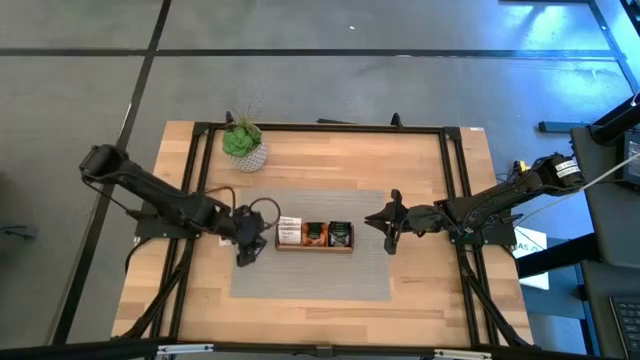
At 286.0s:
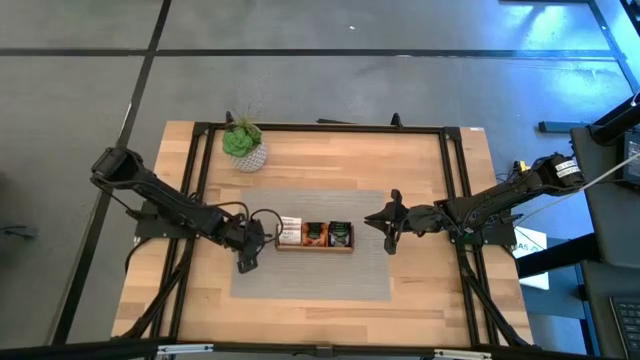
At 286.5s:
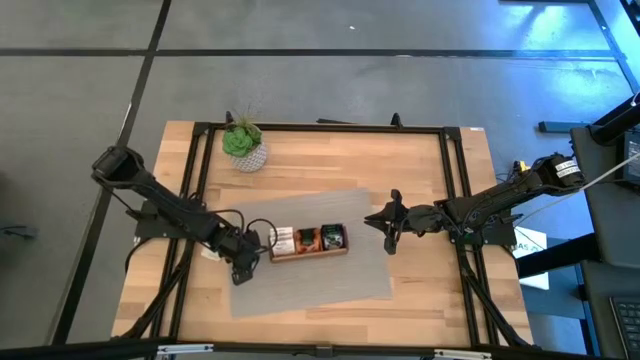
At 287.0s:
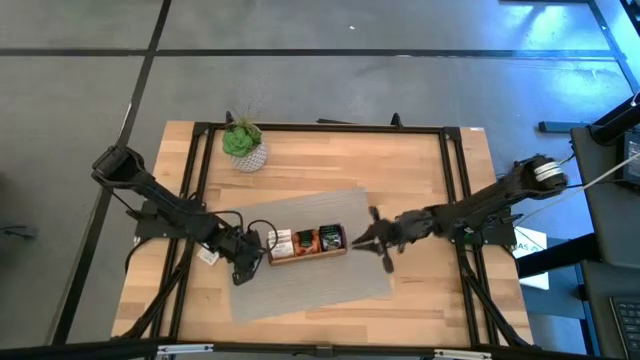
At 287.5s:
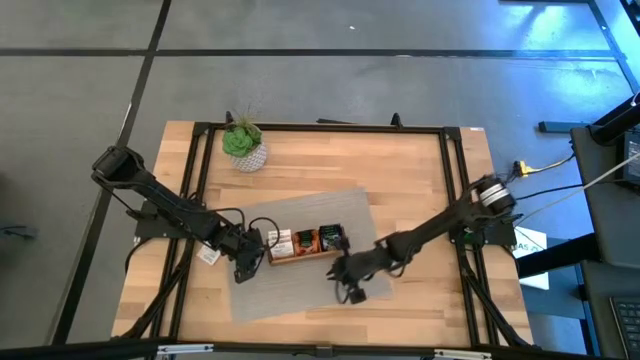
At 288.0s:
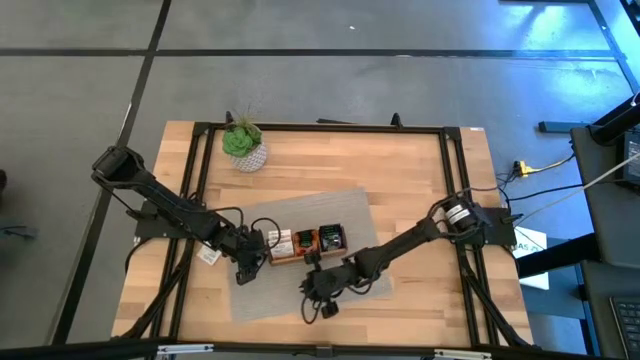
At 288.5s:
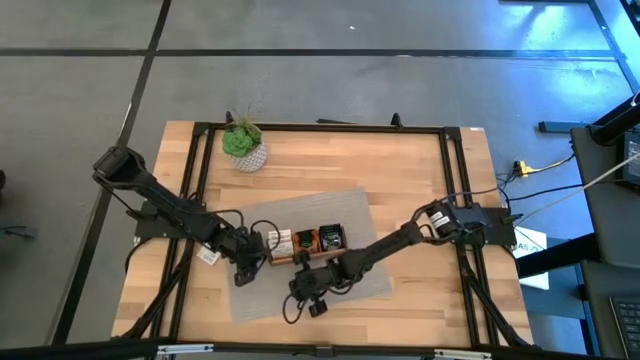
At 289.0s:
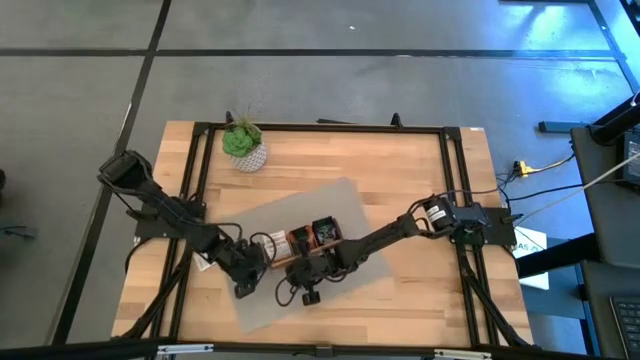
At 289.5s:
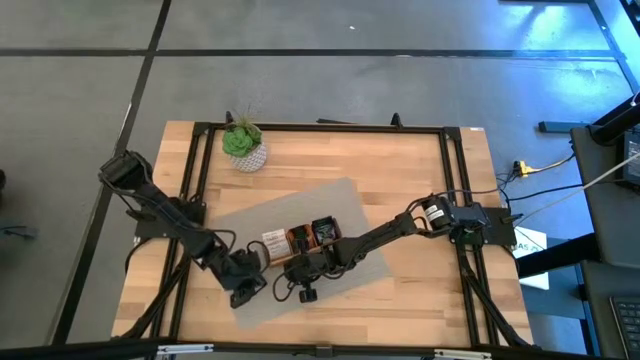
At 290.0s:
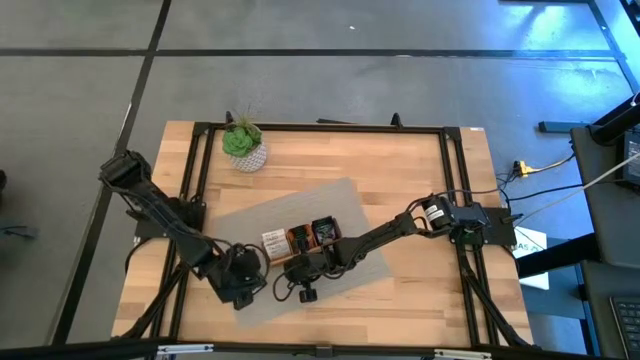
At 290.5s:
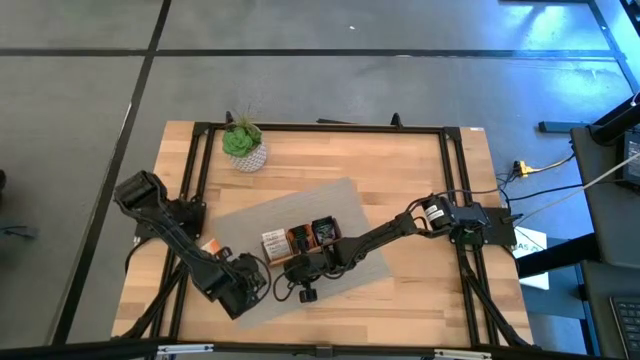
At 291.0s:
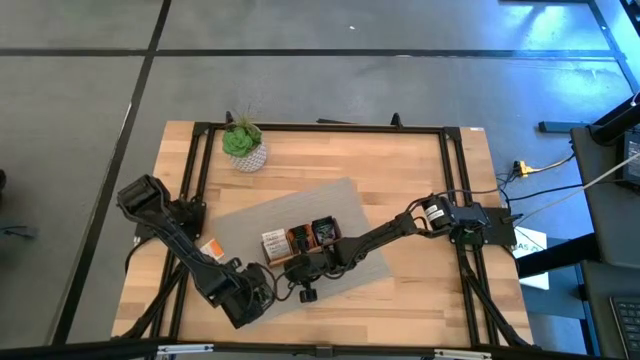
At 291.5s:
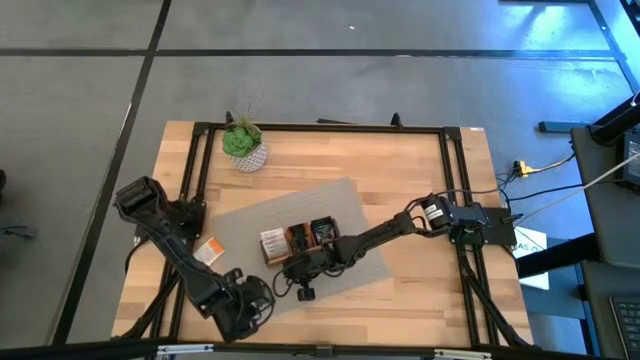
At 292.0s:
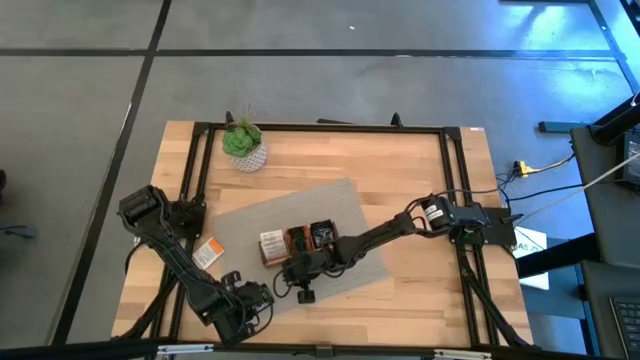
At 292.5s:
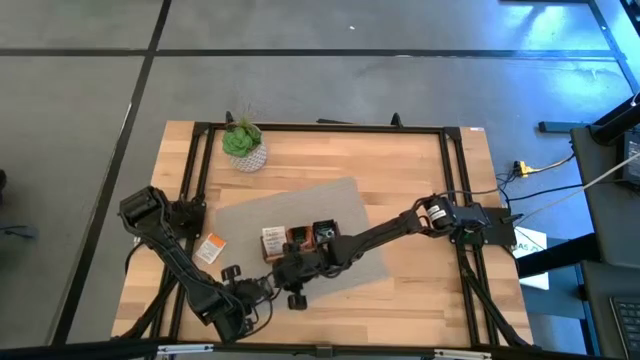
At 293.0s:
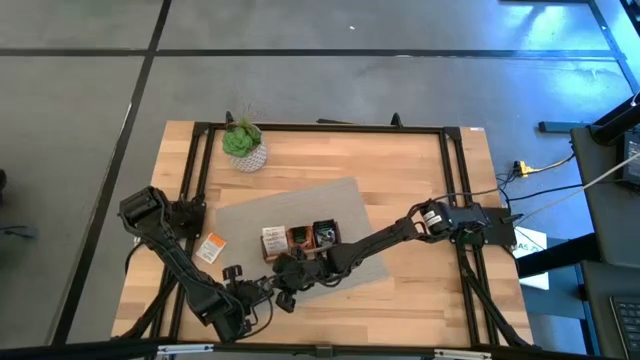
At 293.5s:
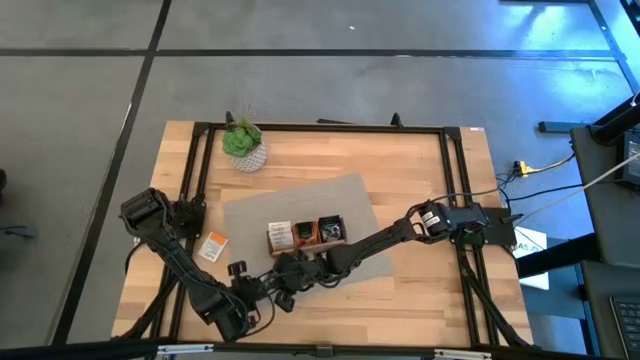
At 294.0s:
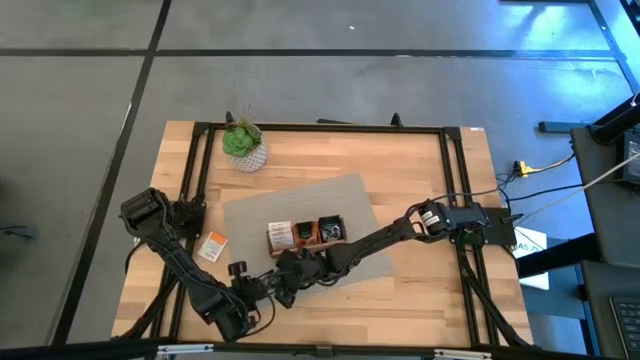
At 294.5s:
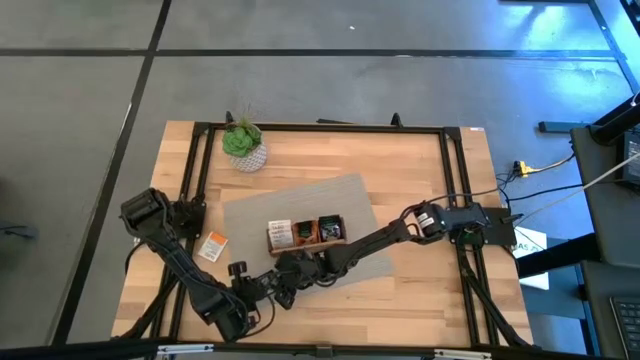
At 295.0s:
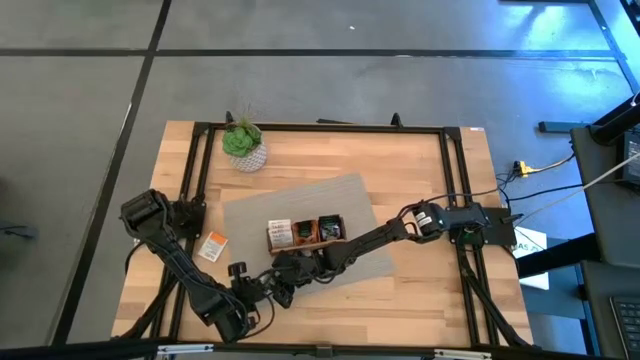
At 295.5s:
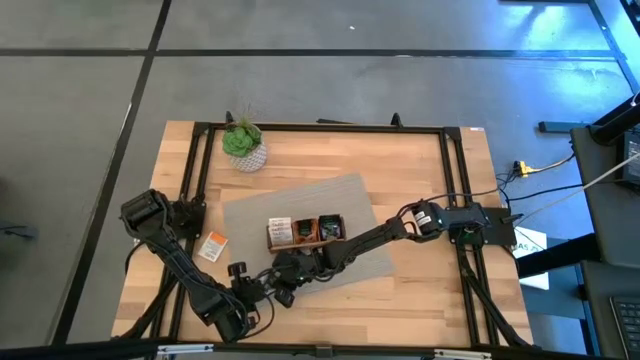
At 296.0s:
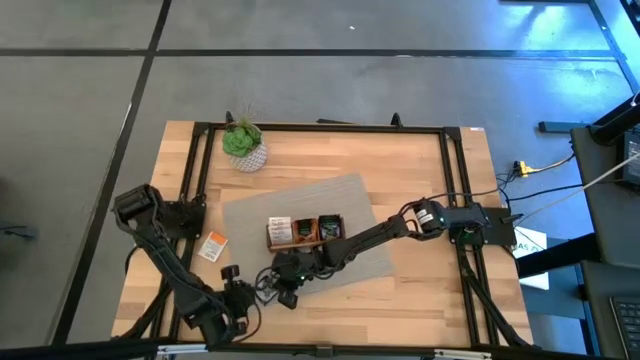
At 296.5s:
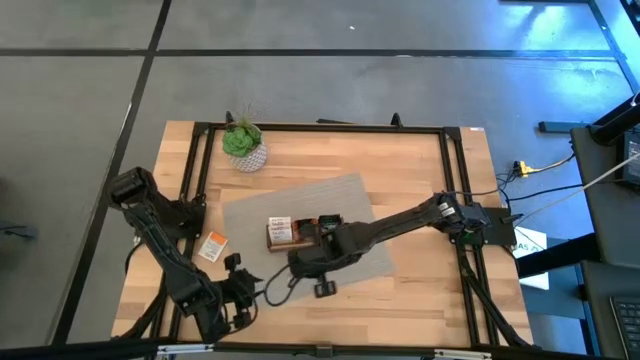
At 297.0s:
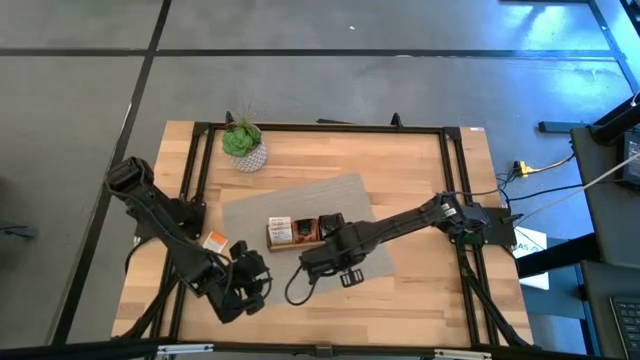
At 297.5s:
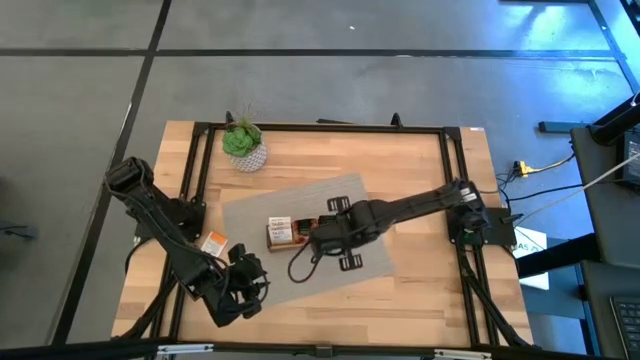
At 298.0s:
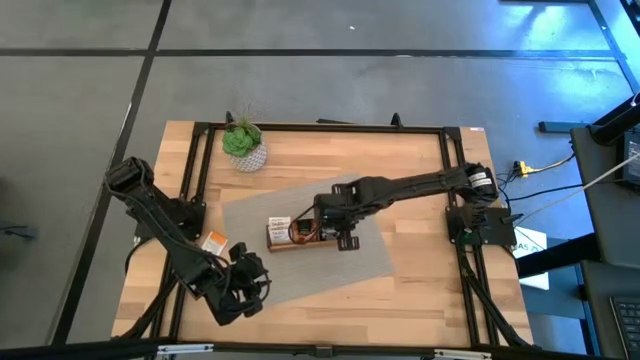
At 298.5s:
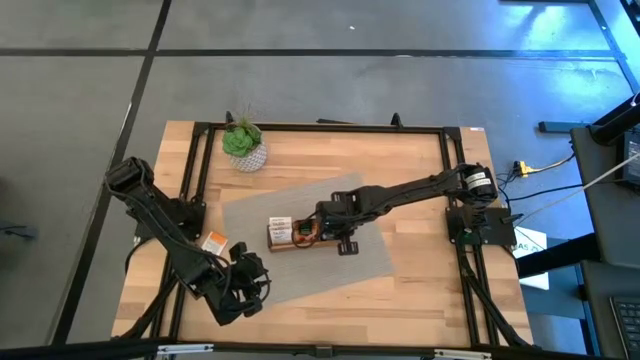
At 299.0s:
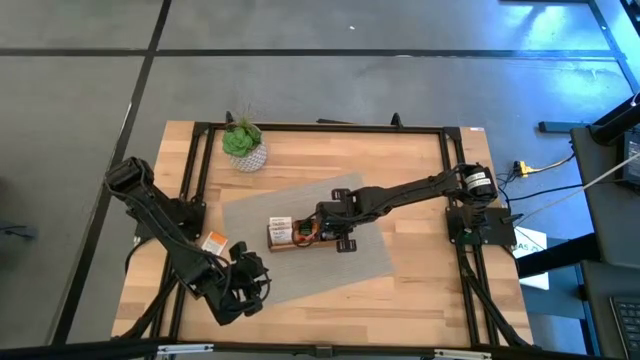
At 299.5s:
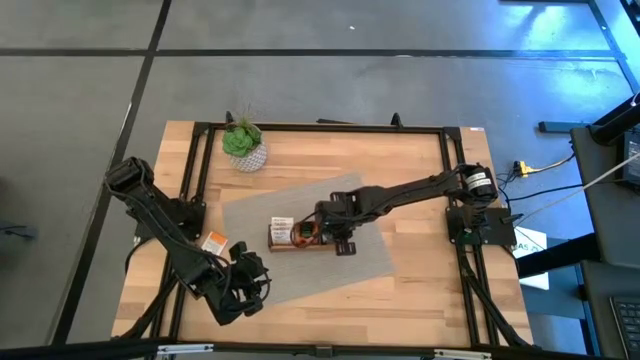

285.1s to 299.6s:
Task: Pick & Place Tea
Put the purple tea bag into the right section of the wooden organizer

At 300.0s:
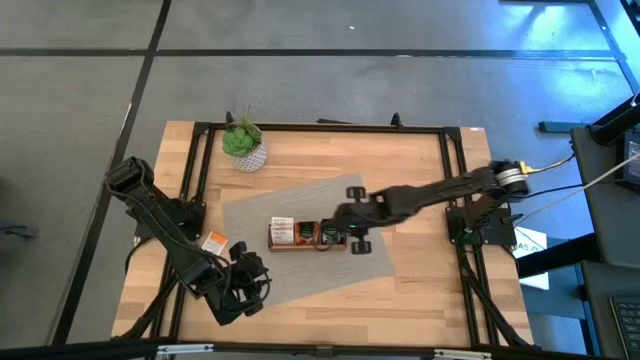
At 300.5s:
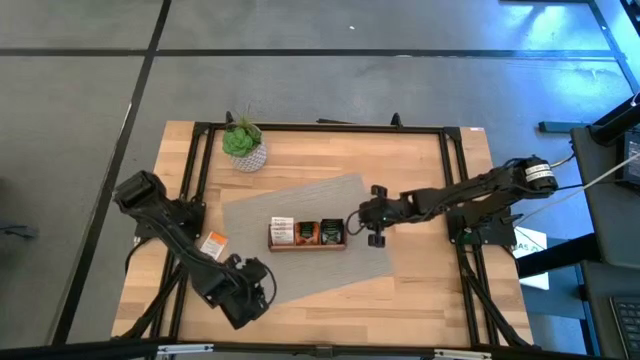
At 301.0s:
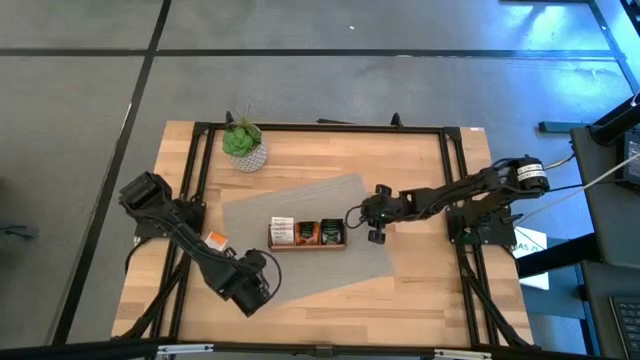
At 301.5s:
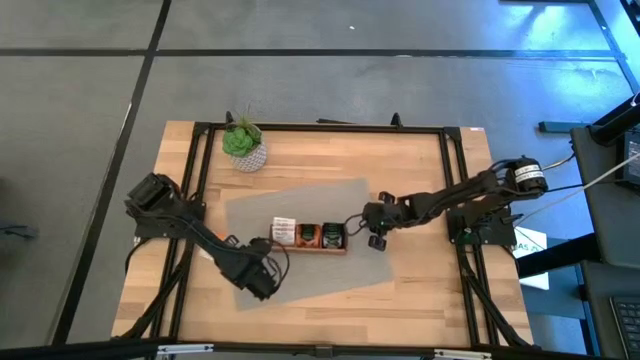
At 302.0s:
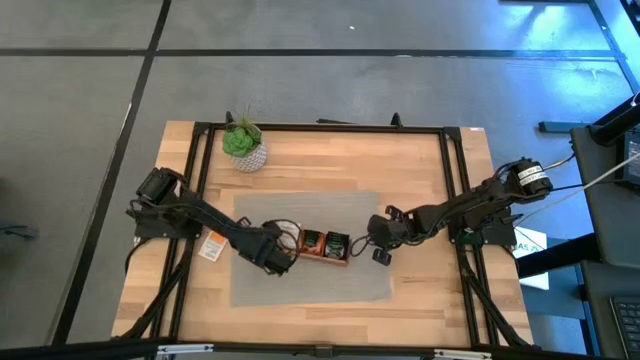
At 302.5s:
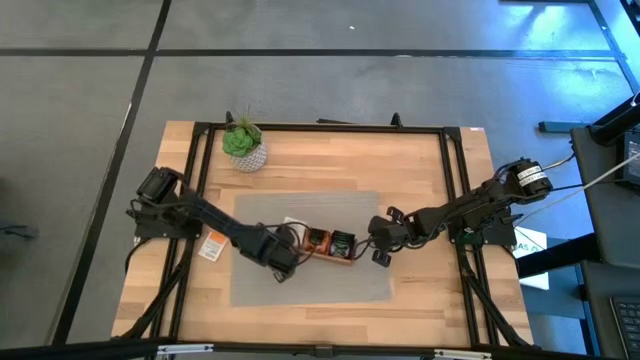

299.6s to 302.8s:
Adjust the gray mat

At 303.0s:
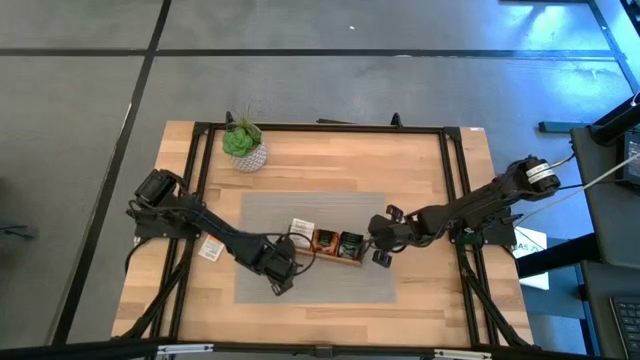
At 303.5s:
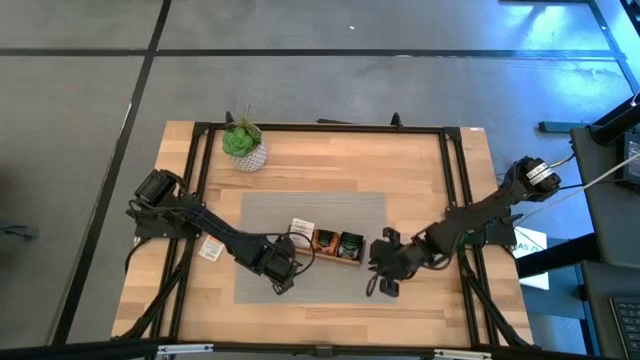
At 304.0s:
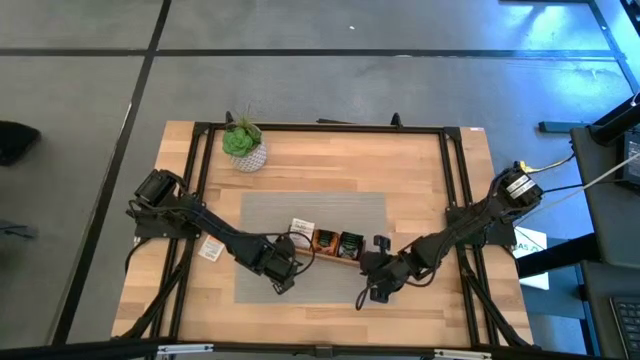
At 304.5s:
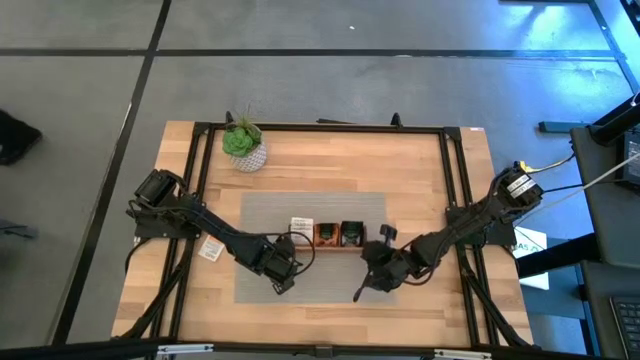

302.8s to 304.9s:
Adjust the wooden organizer
